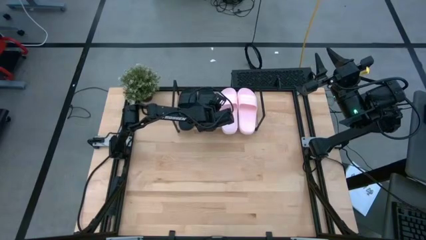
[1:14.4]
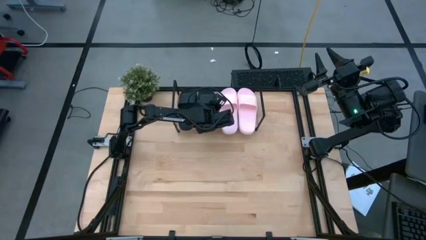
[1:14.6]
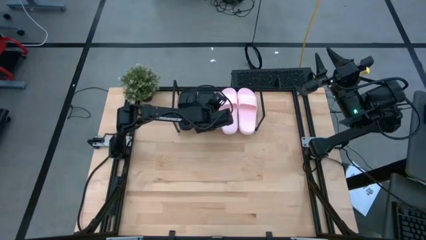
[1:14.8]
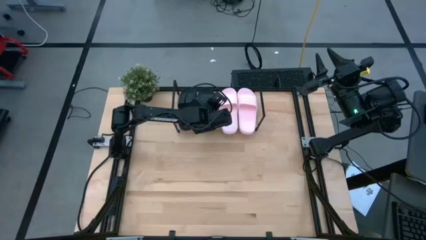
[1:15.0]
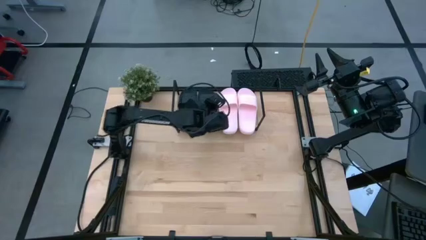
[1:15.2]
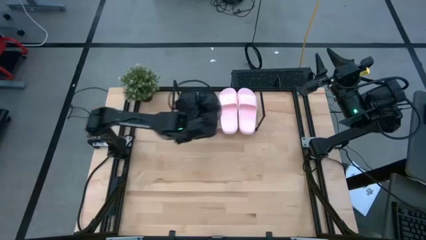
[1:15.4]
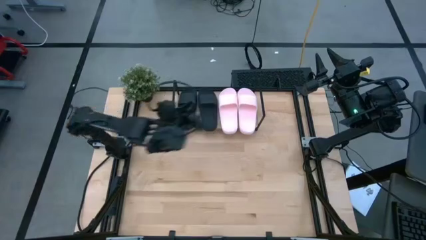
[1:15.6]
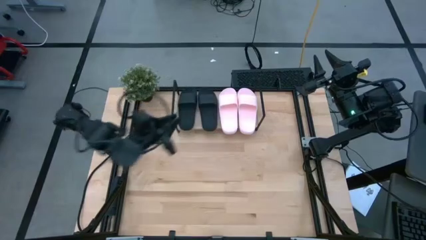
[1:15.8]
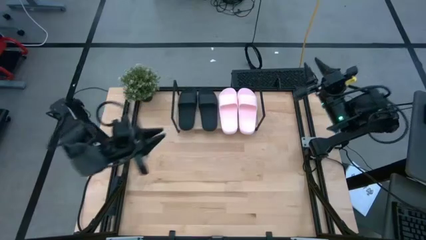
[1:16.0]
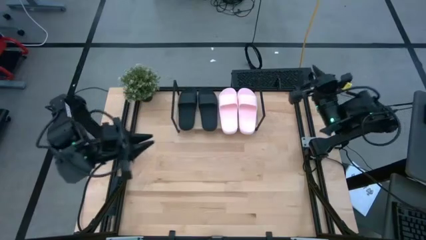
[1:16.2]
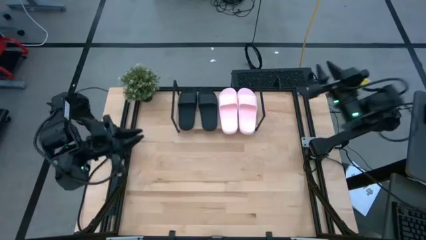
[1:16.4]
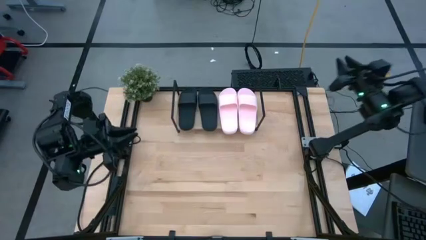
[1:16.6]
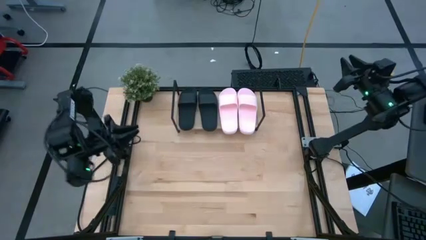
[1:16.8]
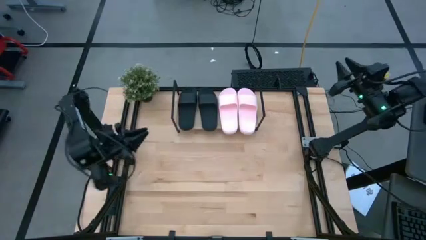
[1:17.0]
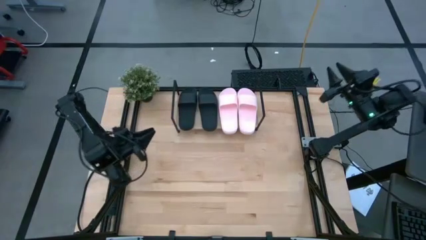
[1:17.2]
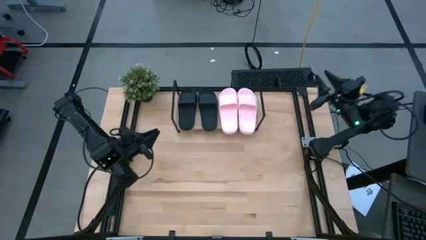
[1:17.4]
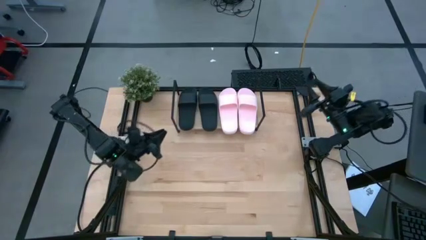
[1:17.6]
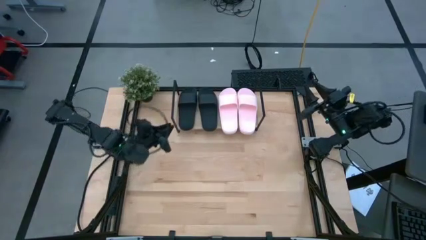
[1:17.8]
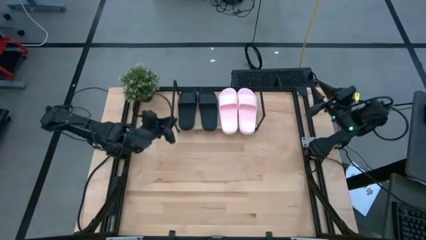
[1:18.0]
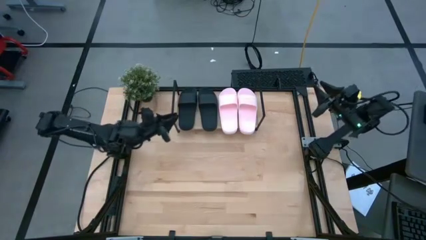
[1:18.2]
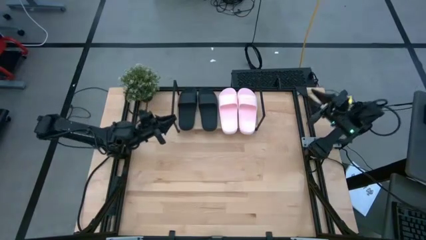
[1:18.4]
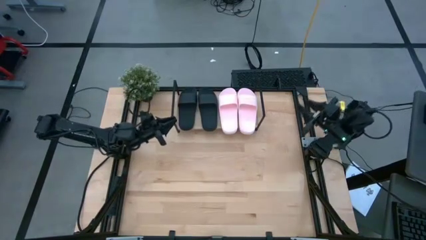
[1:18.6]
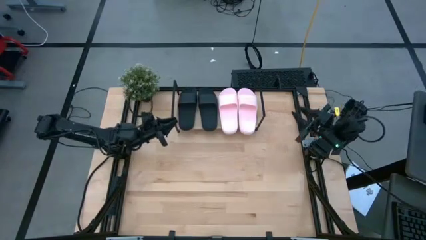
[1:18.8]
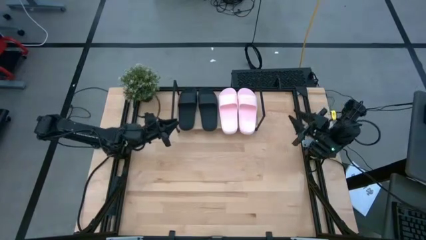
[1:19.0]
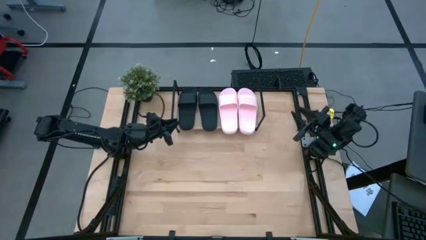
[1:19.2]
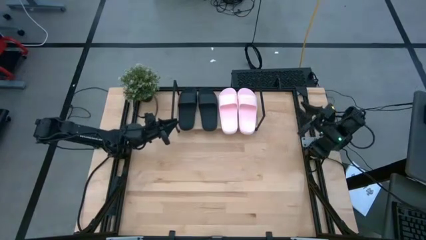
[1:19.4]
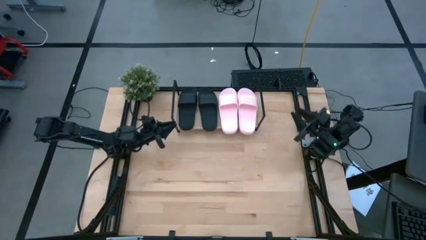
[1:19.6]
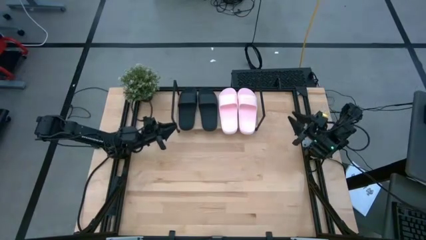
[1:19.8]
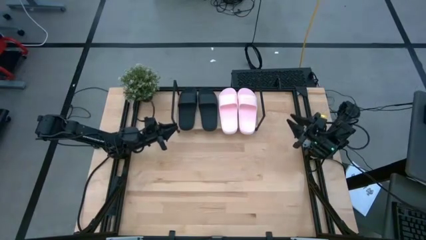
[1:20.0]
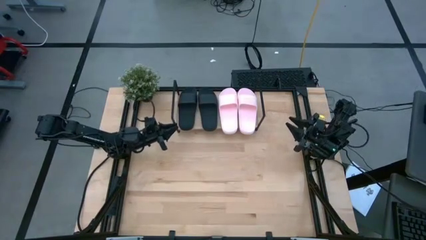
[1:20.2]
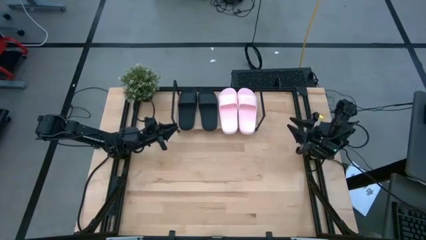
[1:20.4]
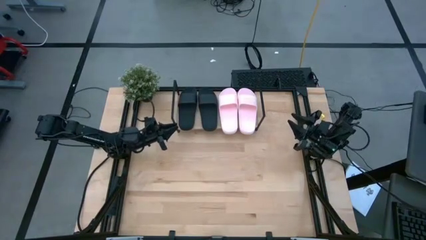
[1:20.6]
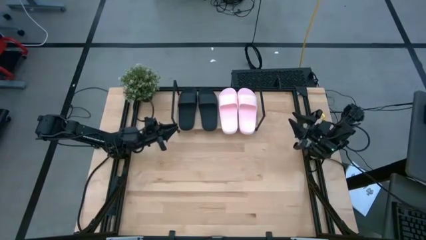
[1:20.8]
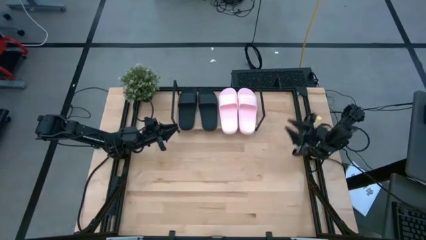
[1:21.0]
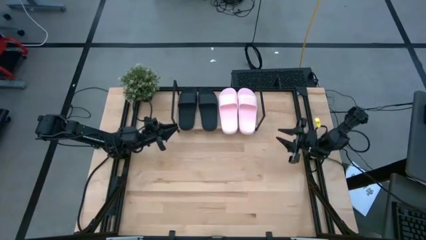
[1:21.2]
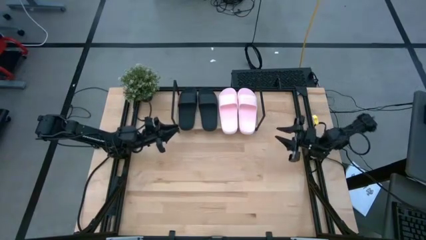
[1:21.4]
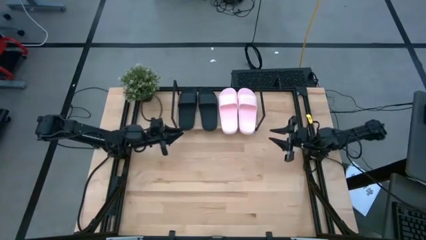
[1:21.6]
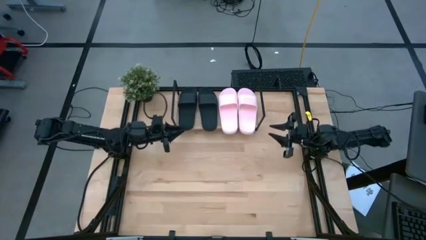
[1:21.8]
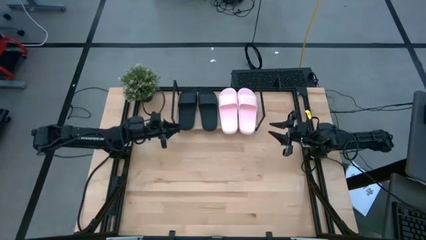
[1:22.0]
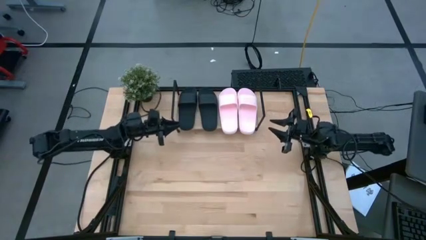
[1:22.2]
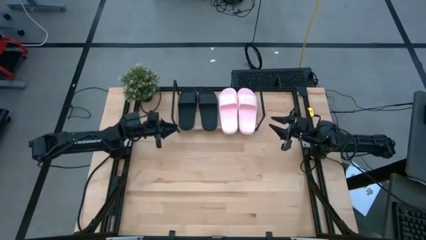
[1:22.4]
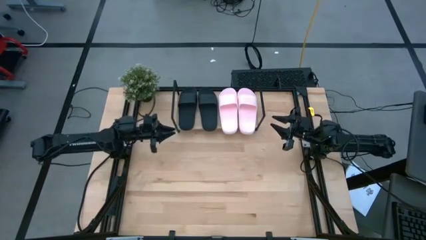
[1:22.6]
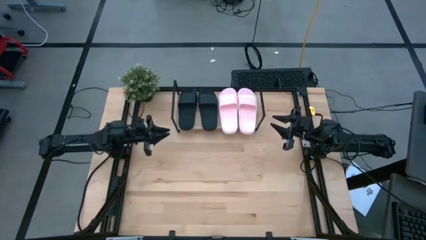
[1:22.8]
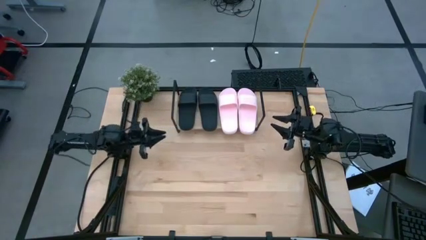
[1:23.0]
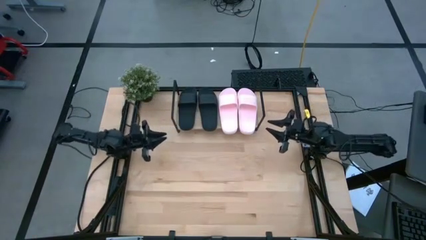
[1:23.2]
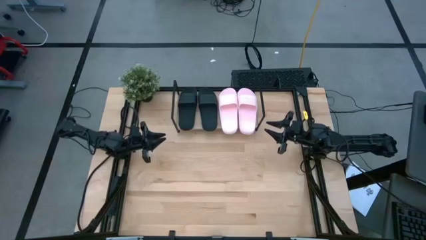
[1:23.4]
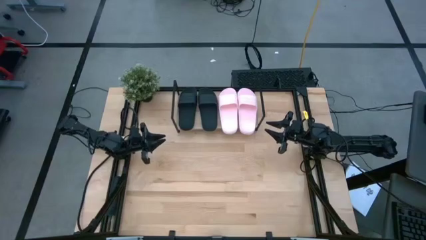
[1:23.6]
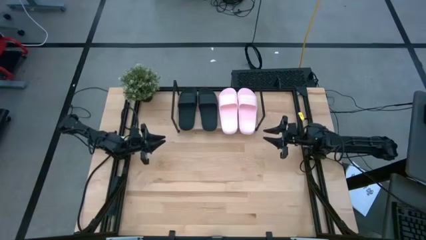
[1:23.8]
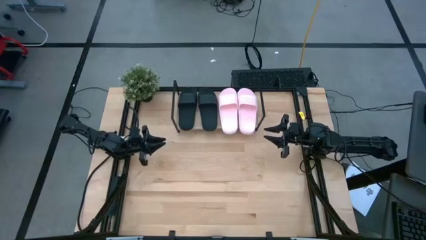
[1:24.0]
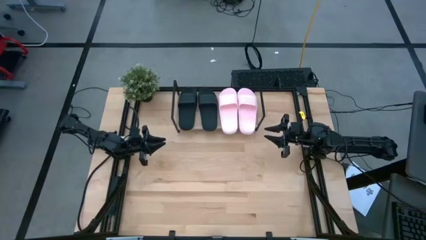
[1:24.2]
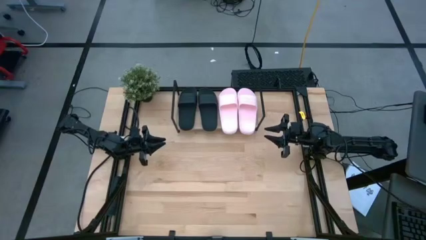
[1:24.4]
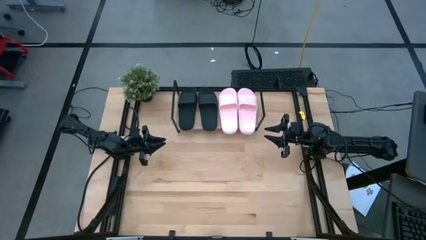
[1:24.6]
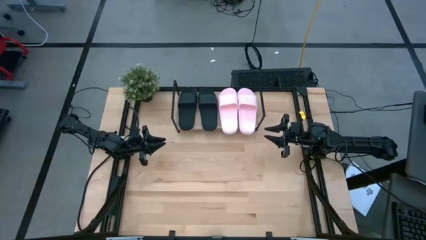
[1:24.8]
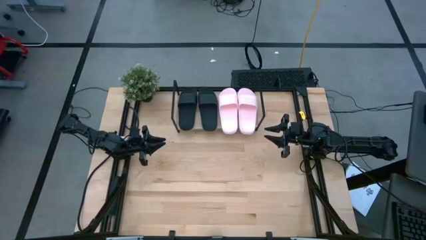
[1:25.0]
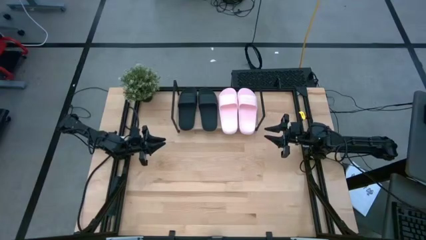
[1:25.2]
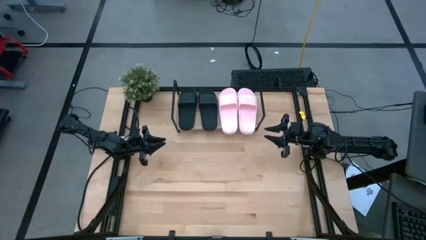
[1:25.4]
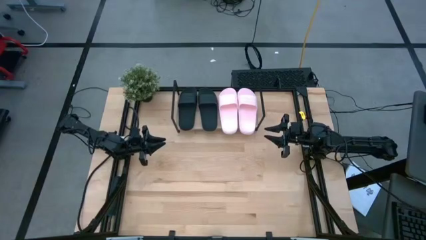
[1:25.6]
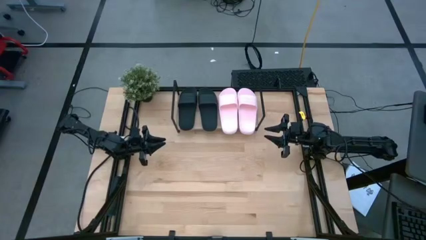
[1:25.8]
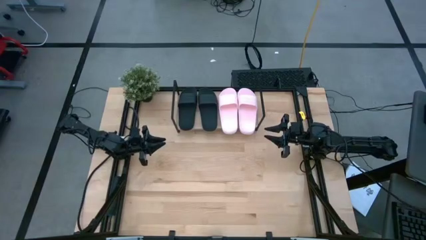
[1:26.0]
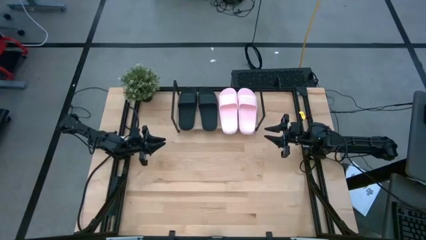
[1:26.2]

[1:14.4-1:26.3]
Task: Pick and place slides into the shelf
Return to Home Position

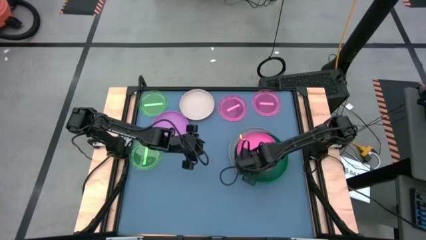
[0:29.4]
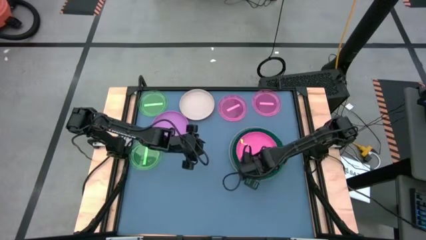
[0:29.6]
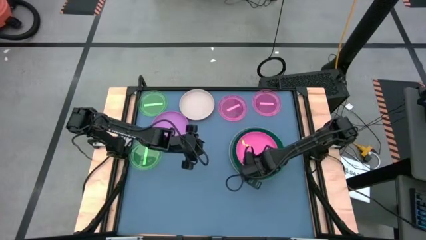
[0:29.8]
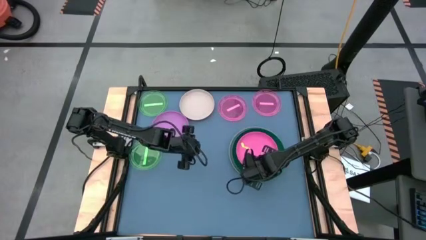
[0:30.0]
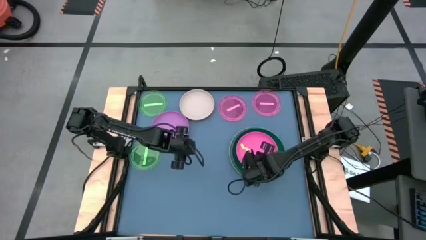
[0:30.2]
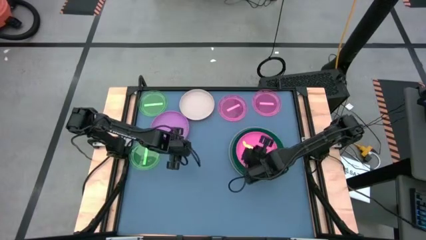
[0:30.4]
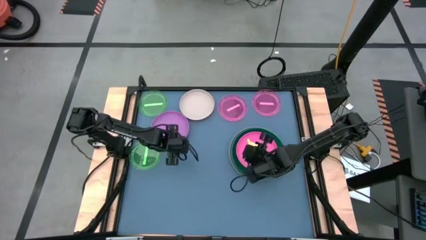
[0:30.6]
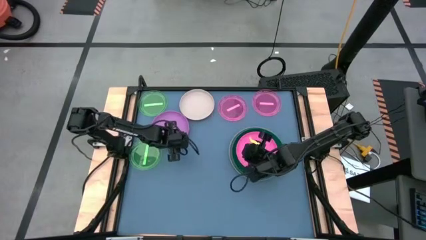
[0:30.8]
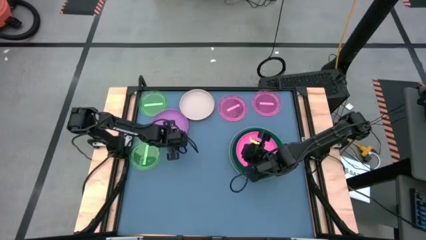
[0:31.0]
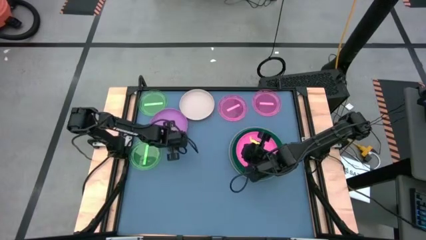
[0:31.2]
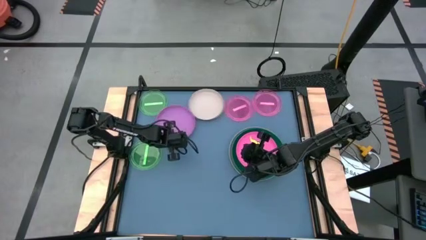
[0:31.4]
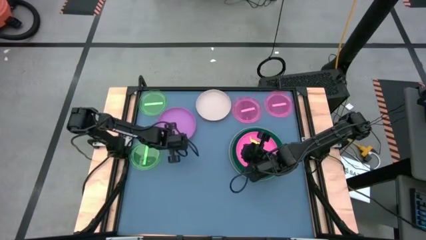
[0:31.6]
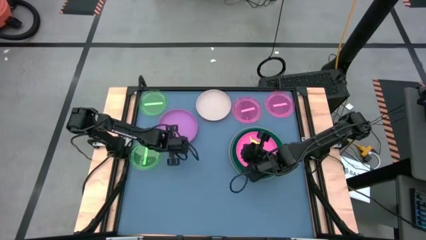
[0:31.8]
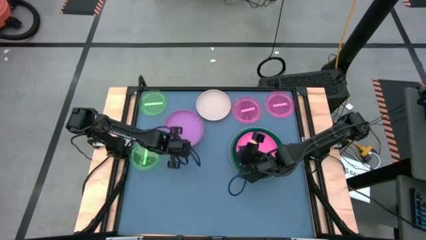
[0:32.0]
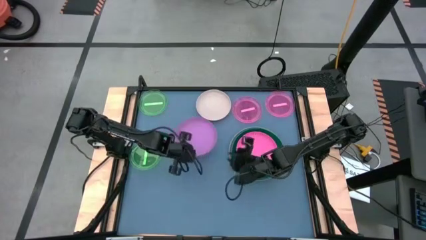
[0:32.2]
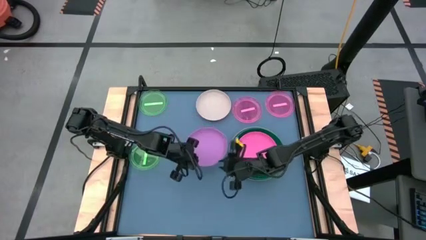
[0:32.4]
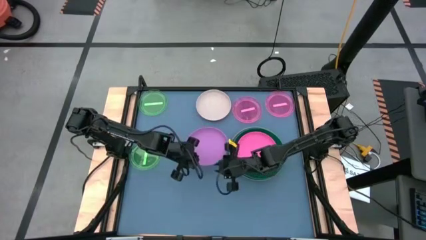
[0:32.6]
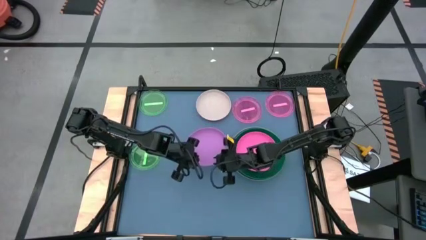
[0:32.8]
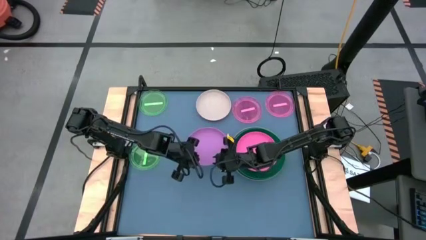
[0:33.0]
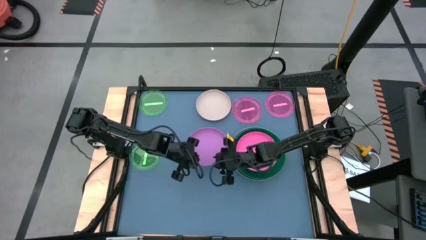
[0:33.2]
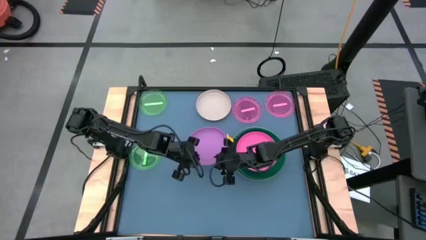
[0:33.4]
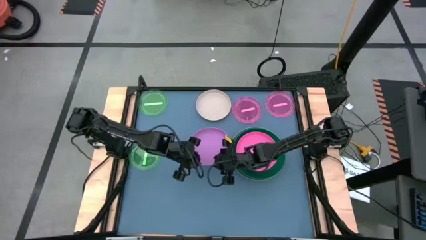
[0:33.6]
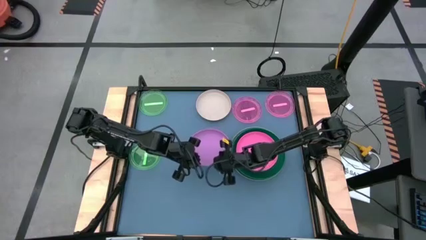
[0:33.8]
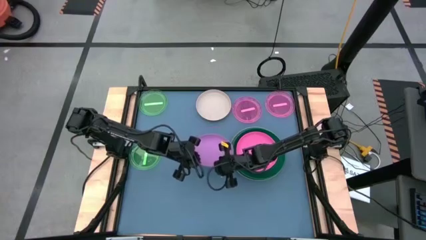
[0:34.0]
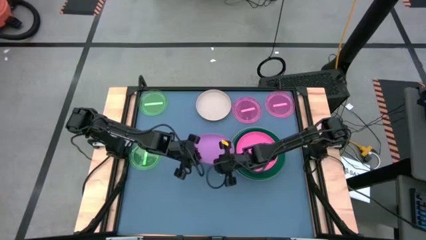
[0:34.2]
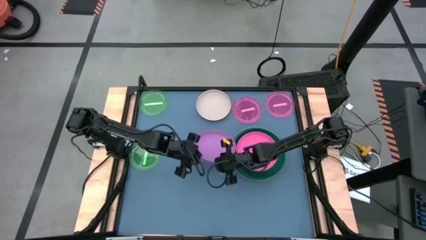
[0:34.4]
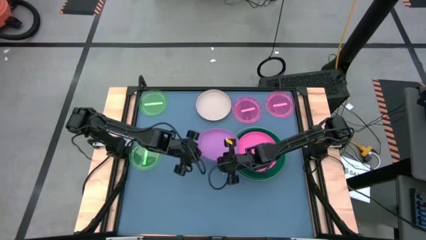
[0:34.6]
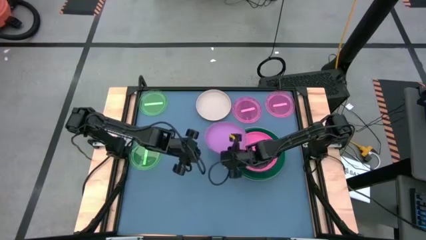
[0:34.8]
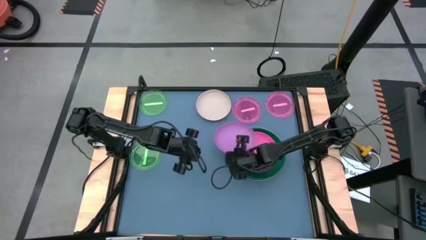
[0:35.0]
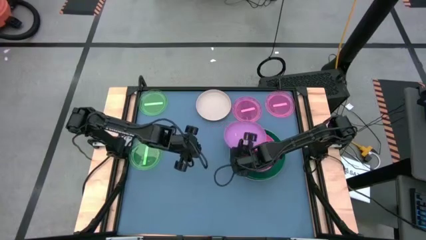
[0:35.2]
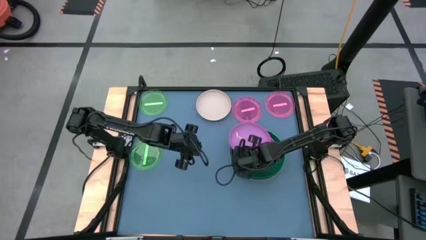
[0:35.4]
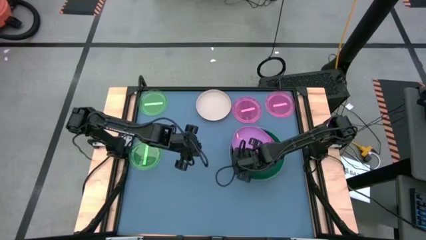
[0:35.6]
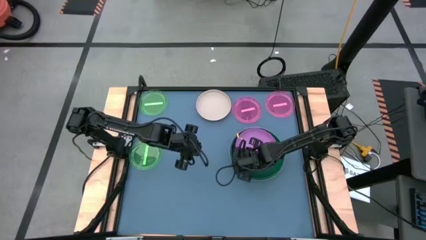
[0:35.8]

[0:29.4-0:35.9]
Task: Stack plastic plates
Stack the purple plate on top of the pink plate
